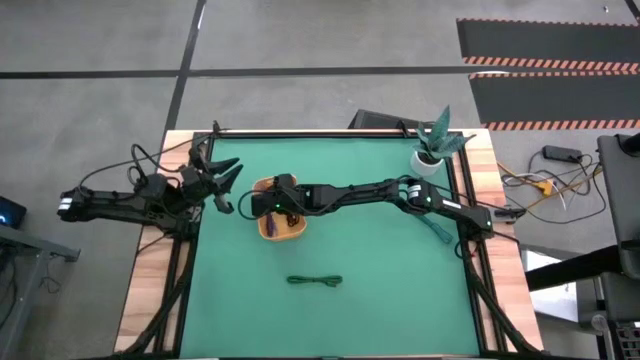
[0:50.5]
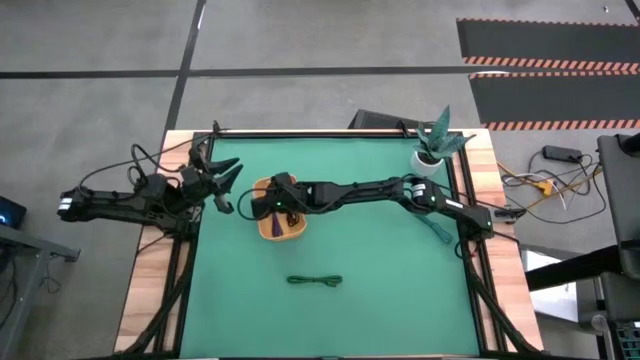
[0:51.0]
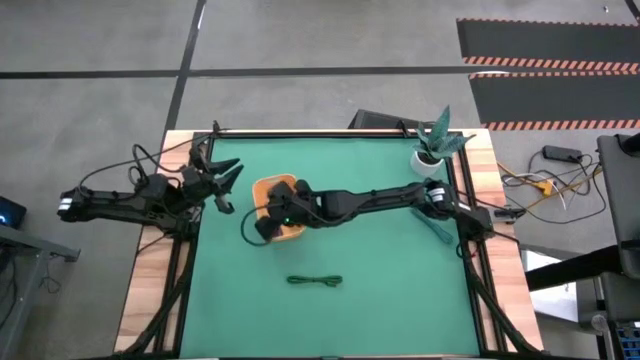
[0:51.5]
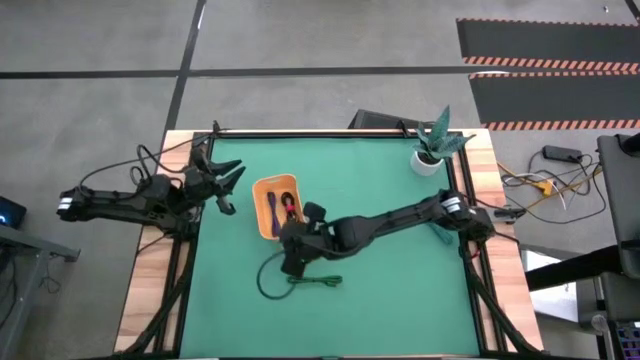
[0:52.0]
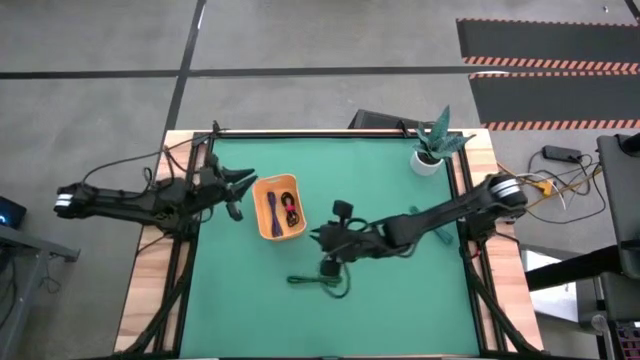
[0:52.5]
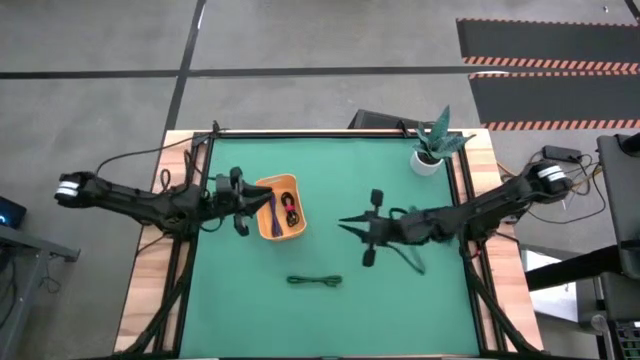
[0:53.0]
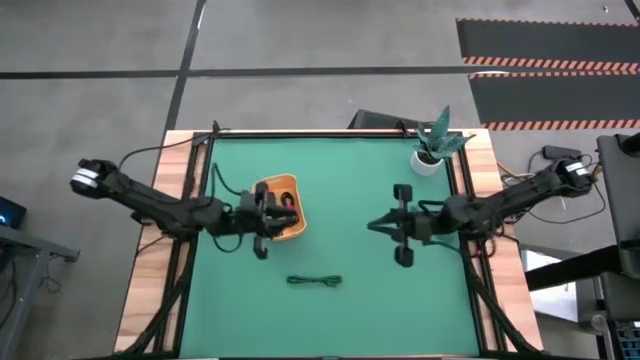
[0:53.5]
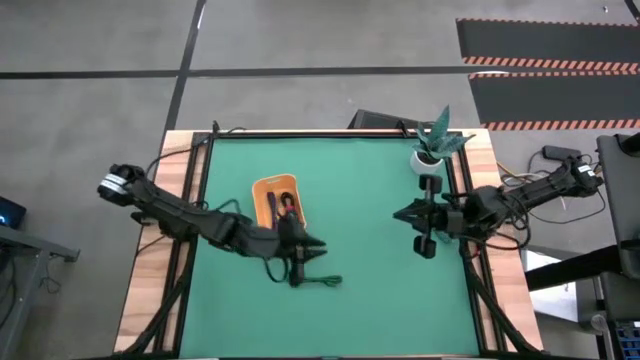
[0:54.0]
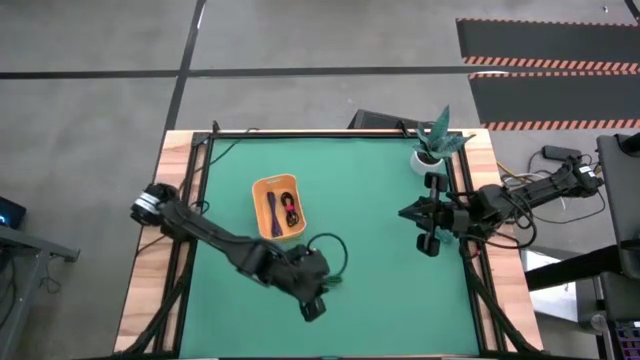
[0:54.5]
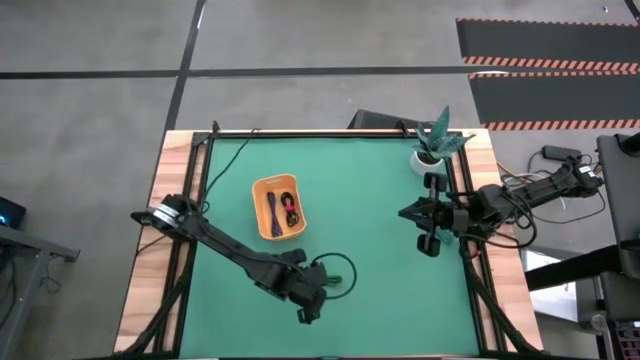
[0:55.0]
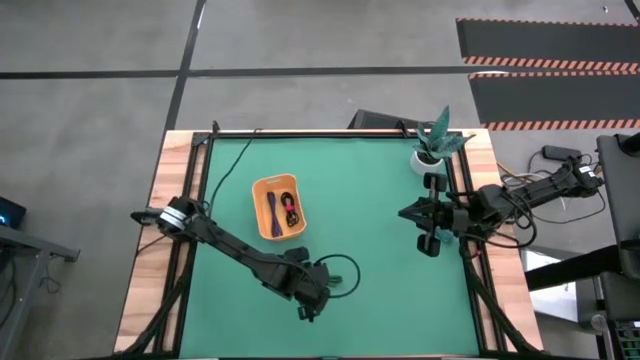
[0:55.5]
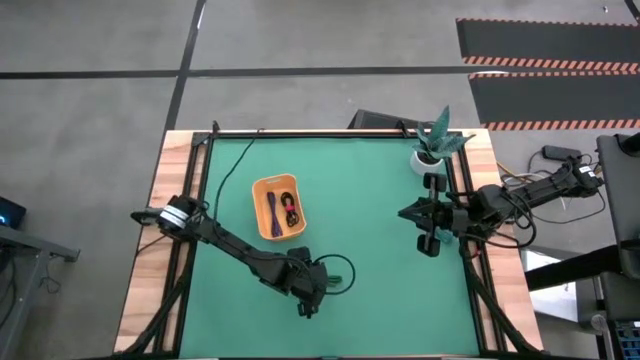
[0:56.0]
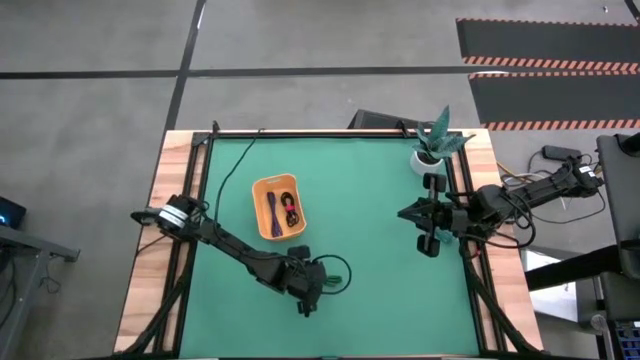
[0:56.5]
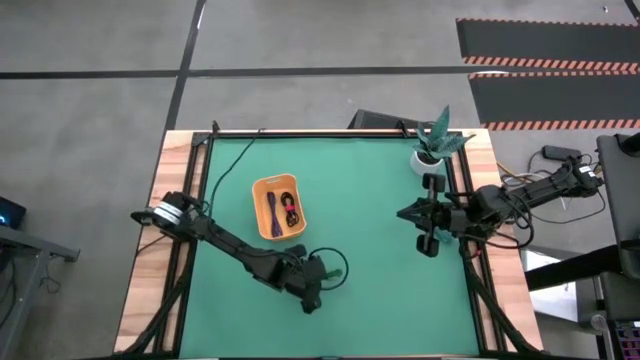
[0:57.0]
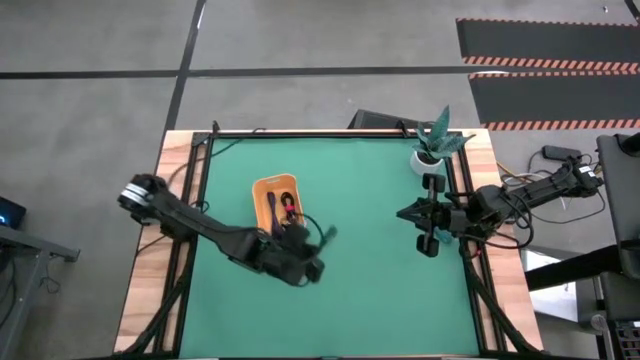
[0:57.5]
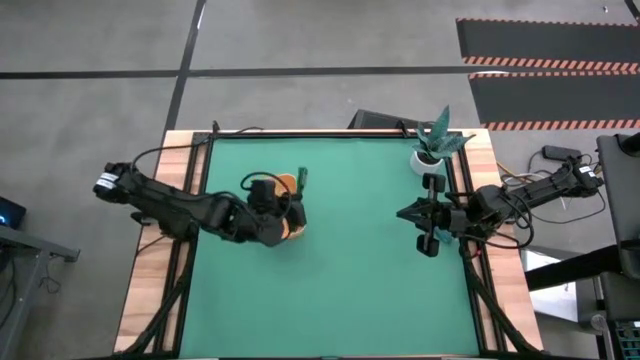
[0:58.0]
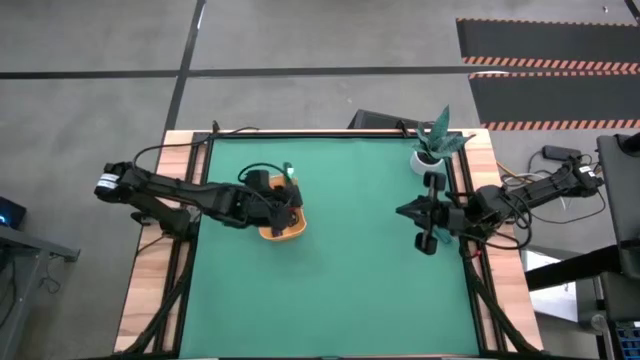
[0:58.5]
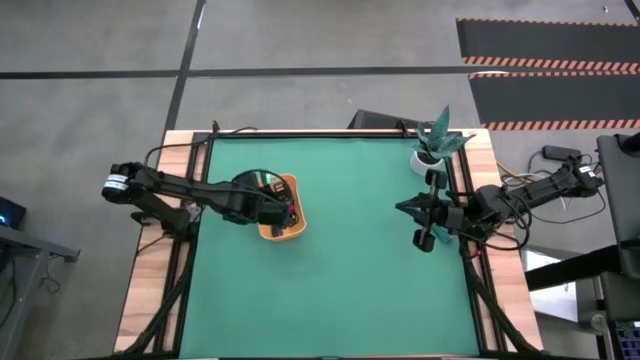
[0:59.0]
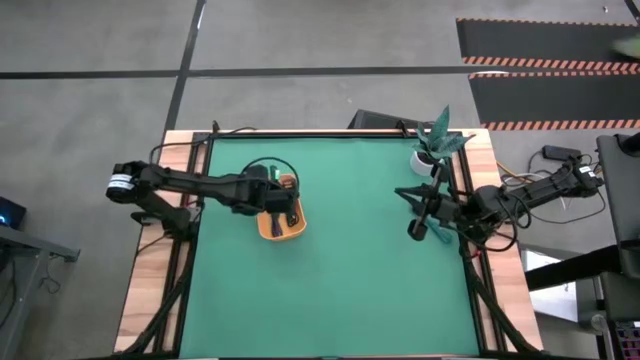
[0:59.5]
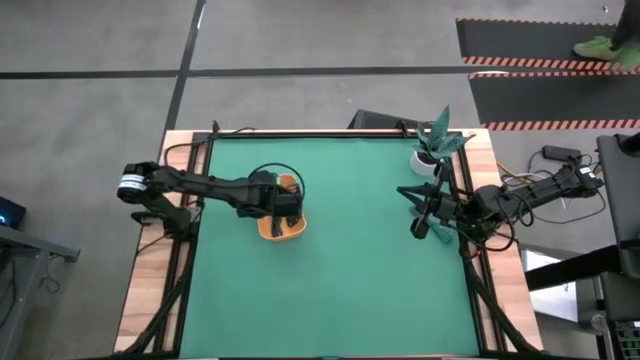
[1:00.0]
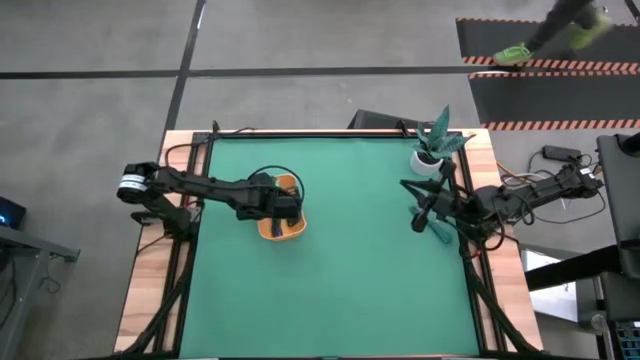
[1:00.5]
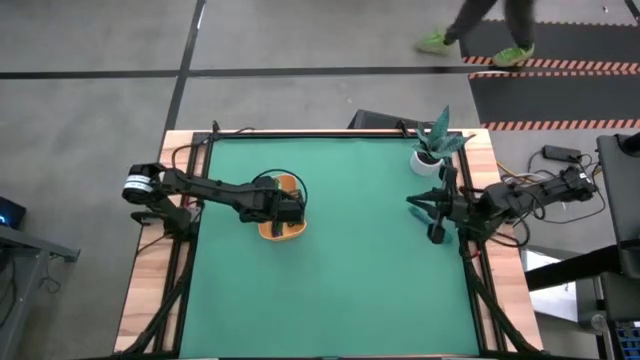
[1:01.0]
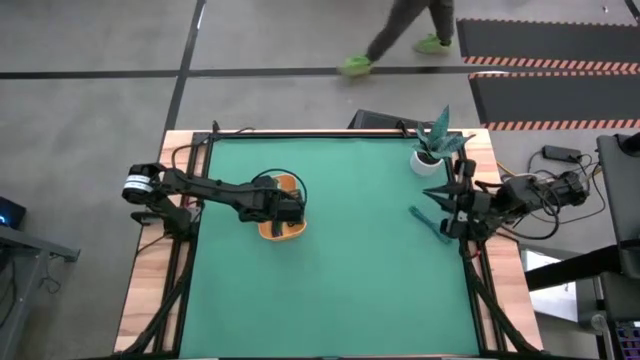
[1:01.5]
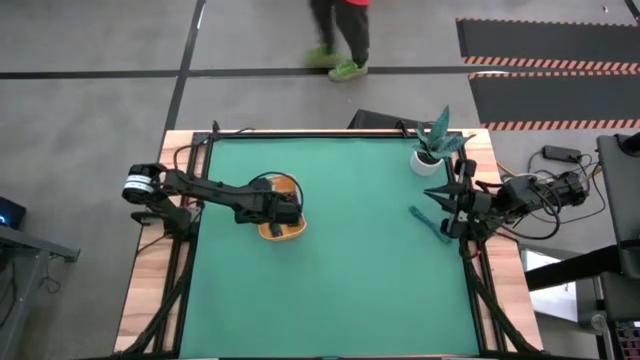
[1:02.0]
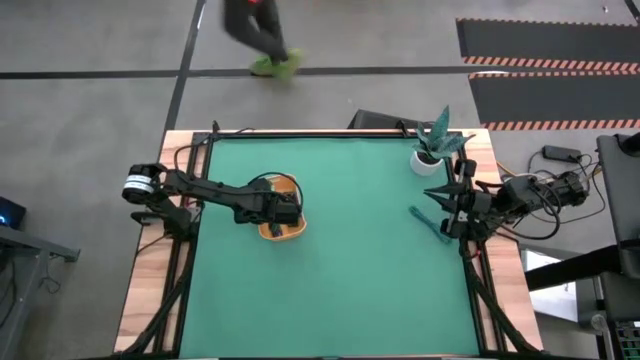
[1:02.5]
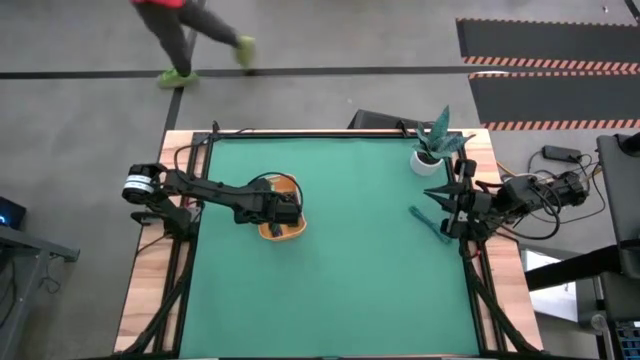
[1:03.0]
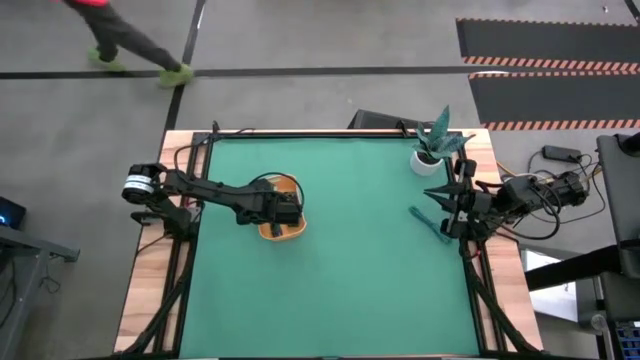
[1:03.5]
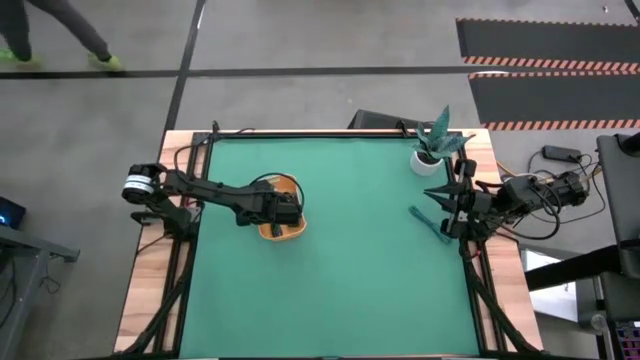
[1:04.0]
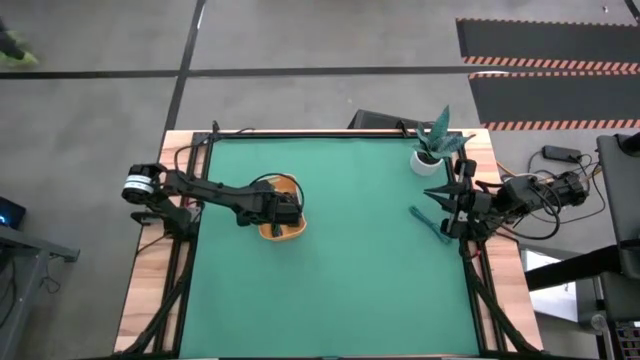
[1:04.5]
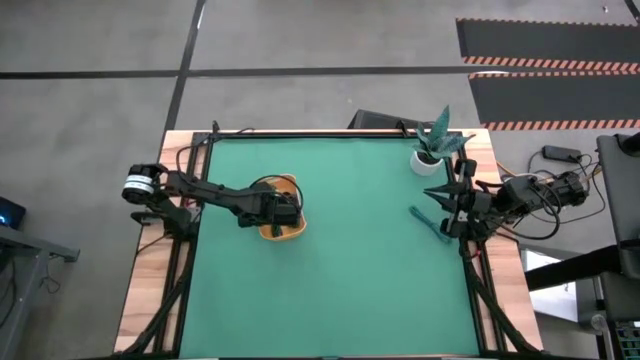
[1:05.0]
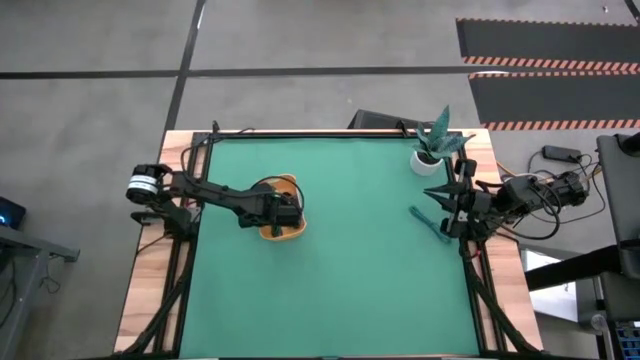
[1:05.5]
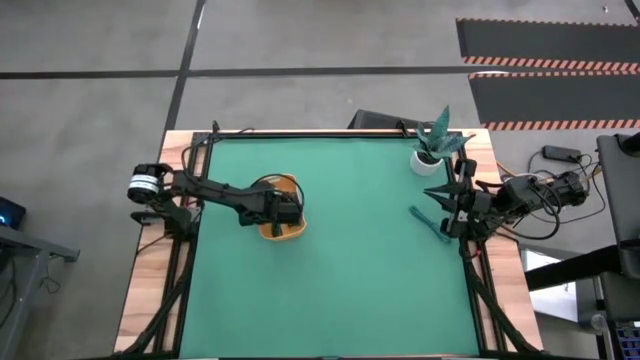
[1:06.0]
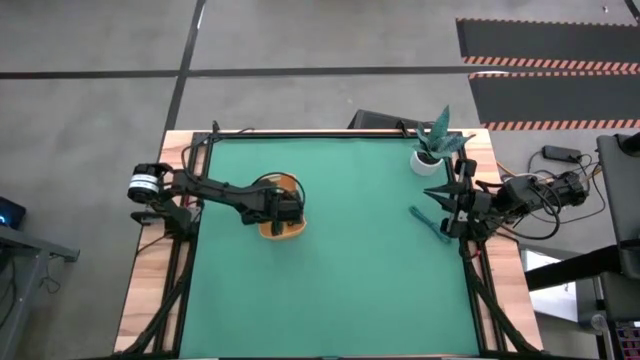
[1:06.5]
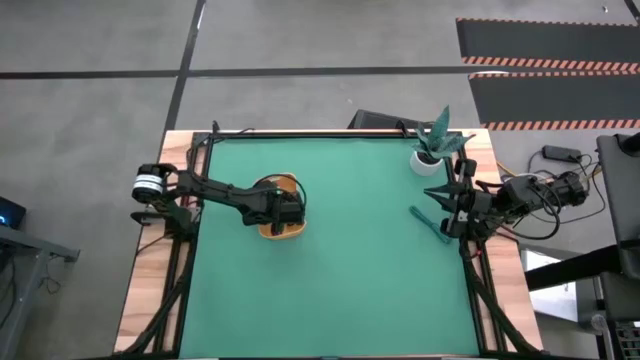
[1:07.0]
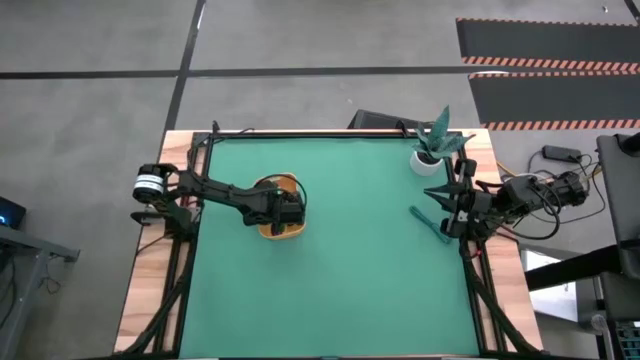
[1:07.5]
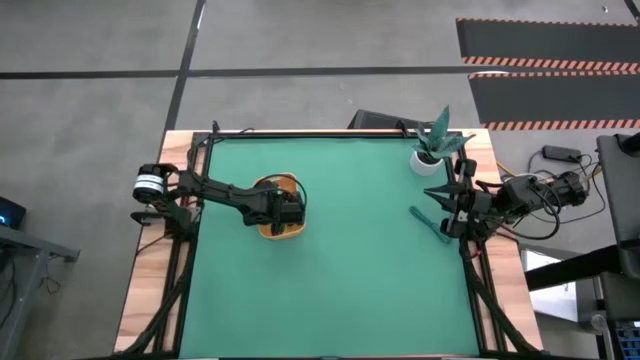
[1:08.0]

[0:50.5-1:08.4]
Task: Pick and place USB-C Cables
Put the green USB cable into the orange bin
